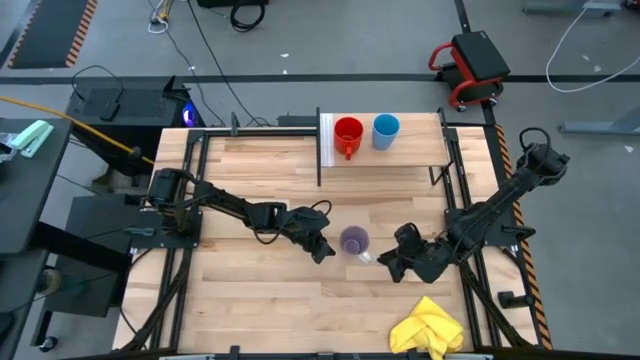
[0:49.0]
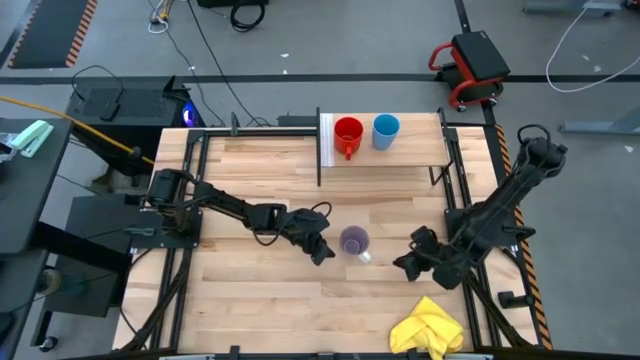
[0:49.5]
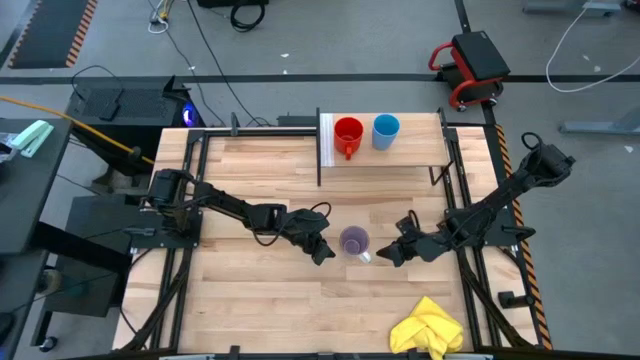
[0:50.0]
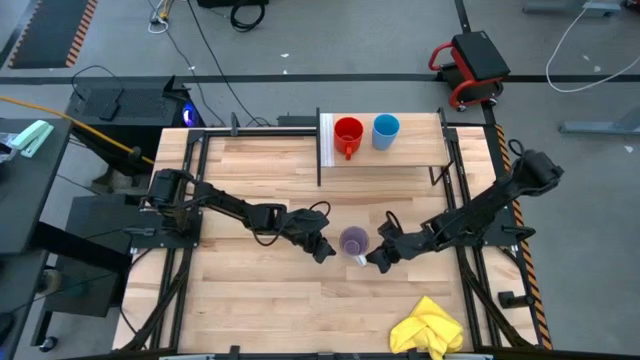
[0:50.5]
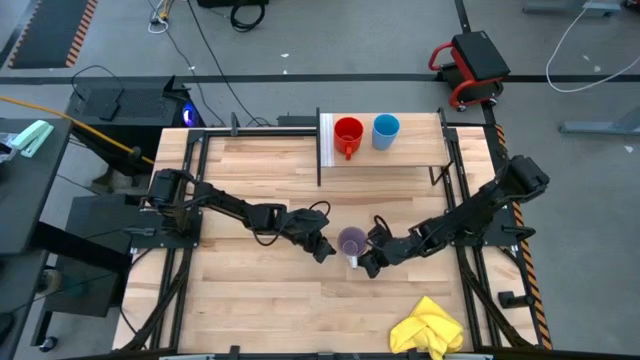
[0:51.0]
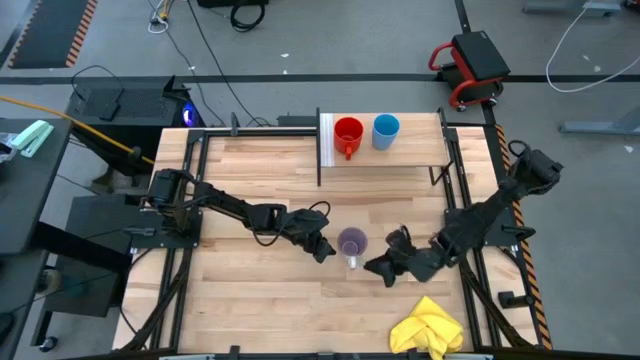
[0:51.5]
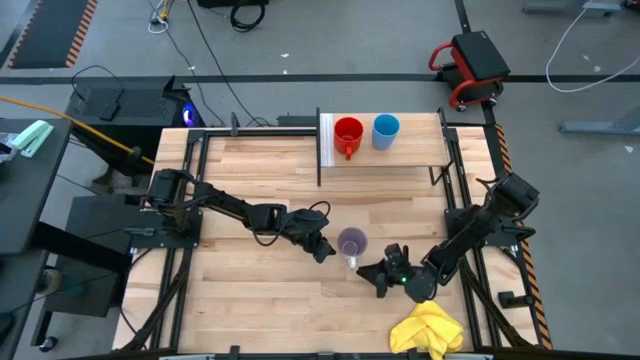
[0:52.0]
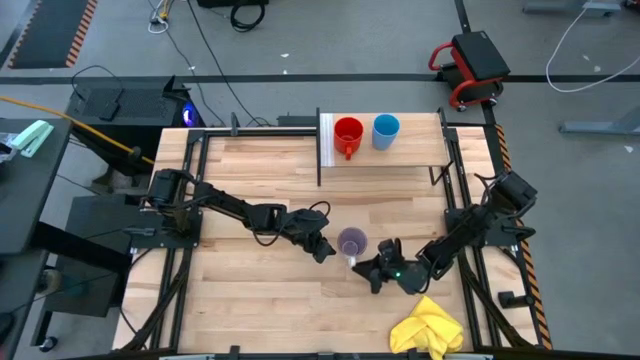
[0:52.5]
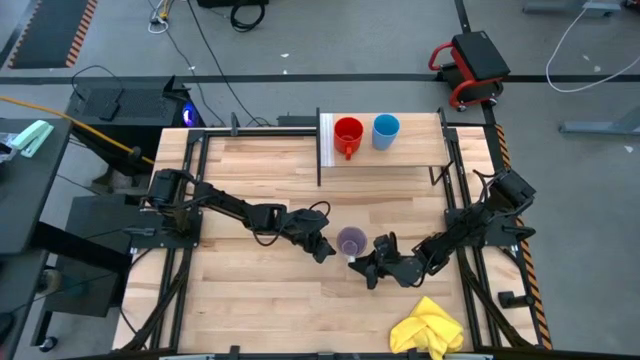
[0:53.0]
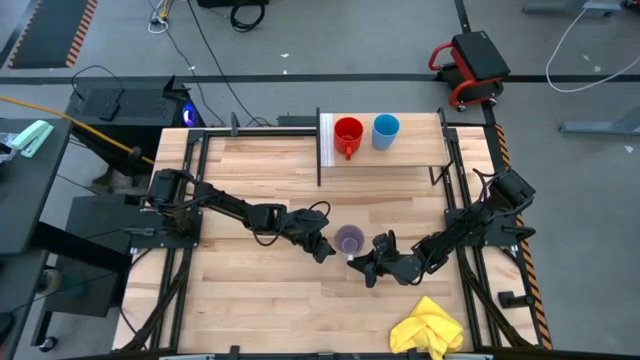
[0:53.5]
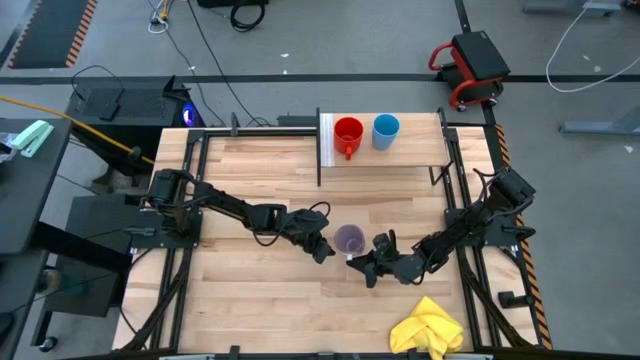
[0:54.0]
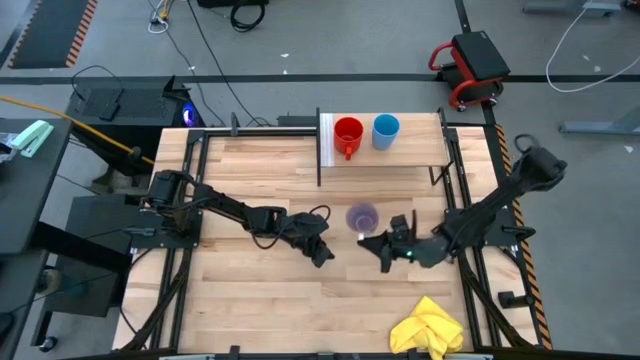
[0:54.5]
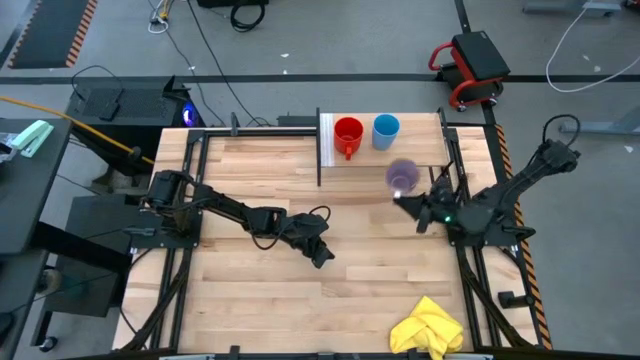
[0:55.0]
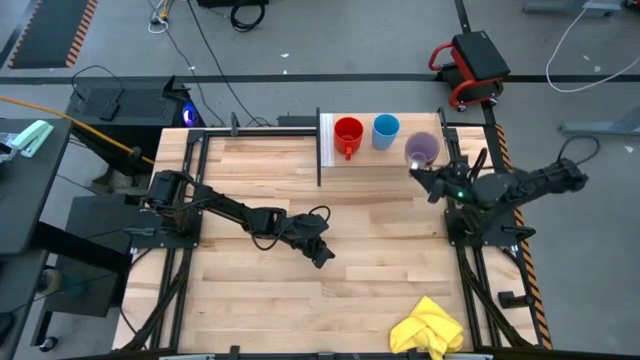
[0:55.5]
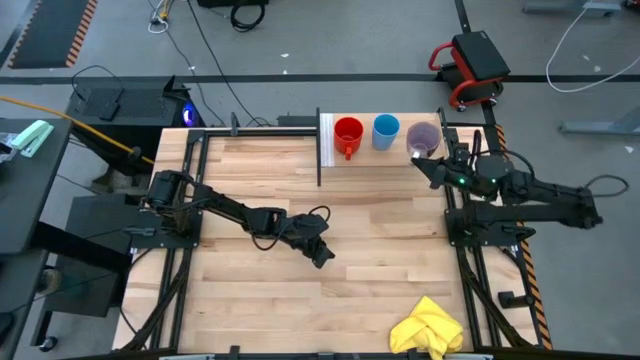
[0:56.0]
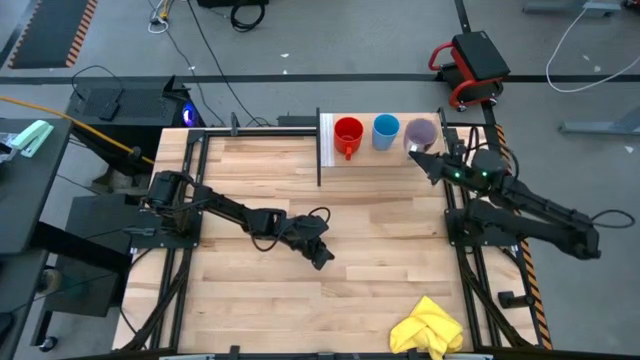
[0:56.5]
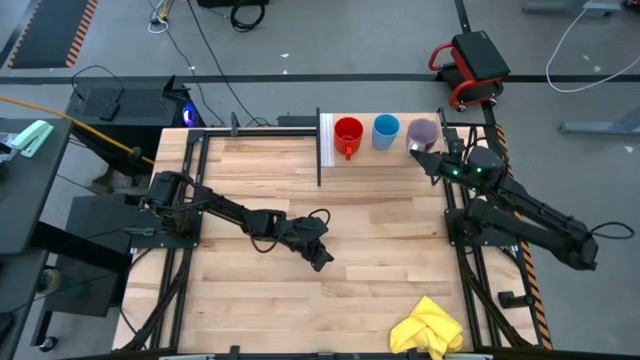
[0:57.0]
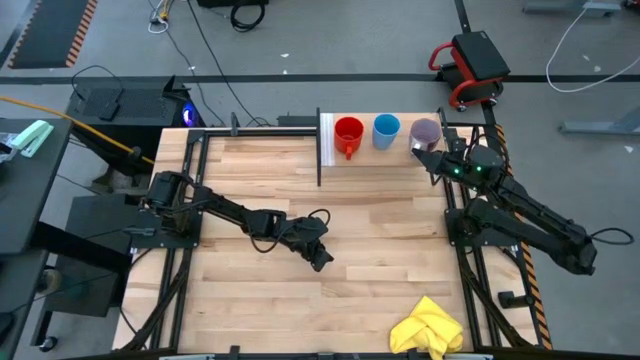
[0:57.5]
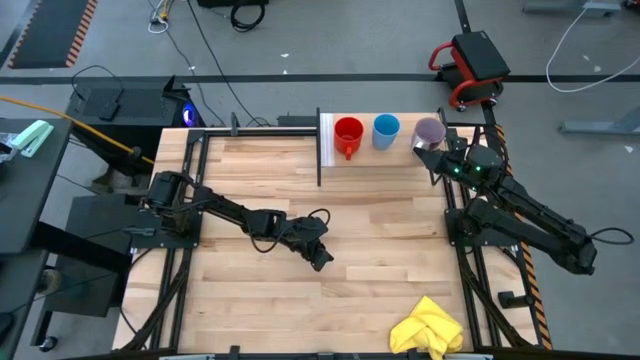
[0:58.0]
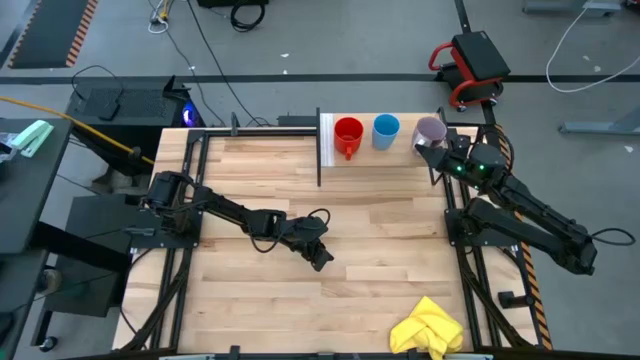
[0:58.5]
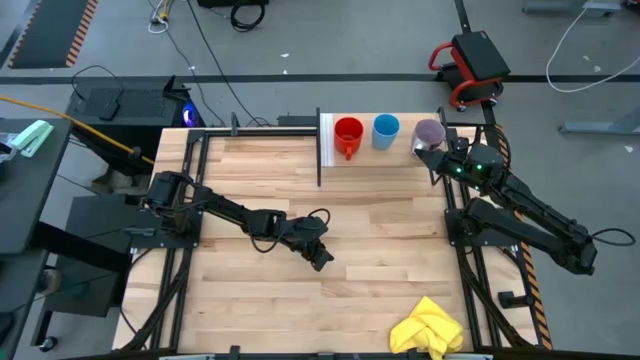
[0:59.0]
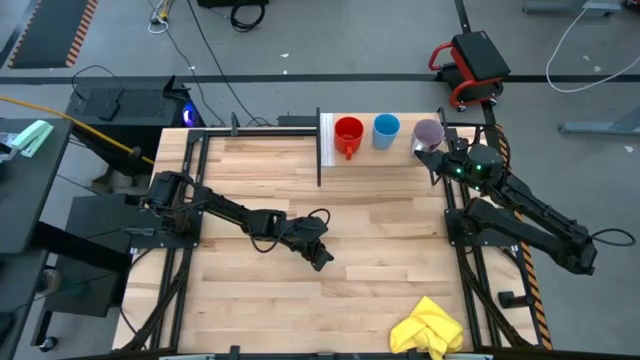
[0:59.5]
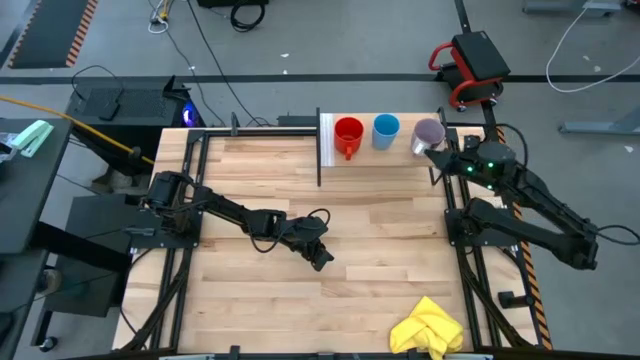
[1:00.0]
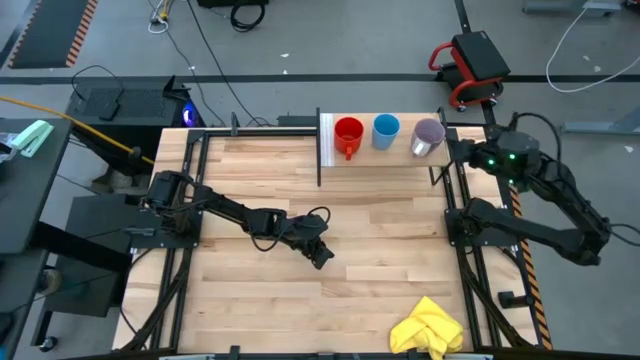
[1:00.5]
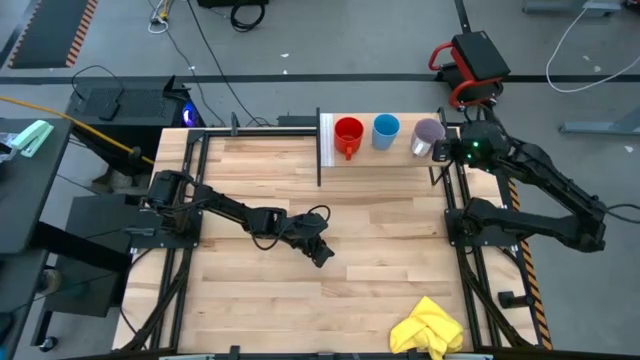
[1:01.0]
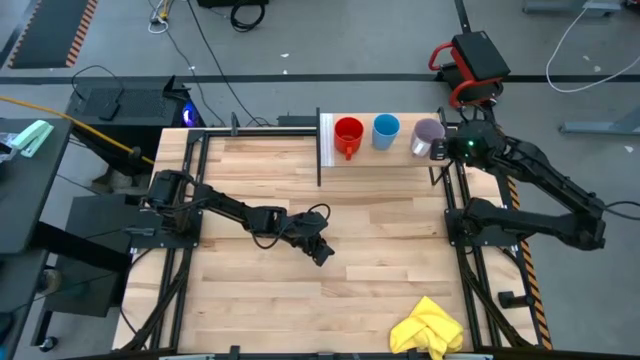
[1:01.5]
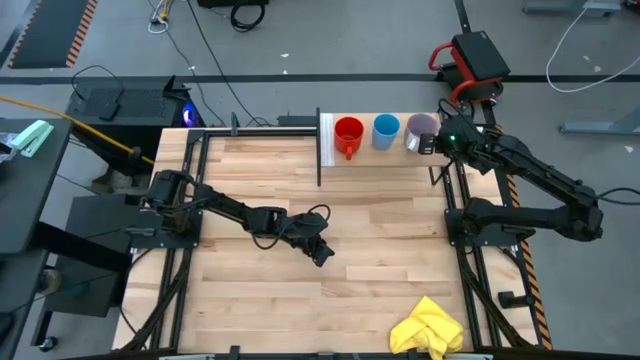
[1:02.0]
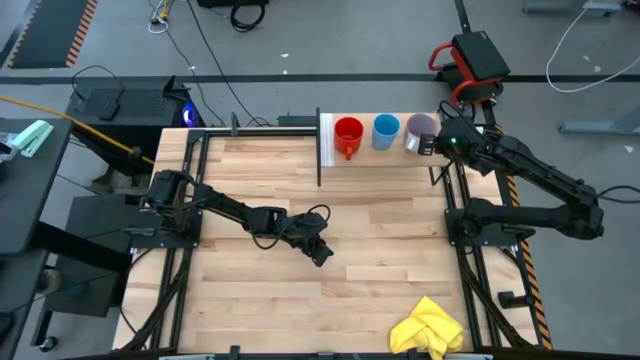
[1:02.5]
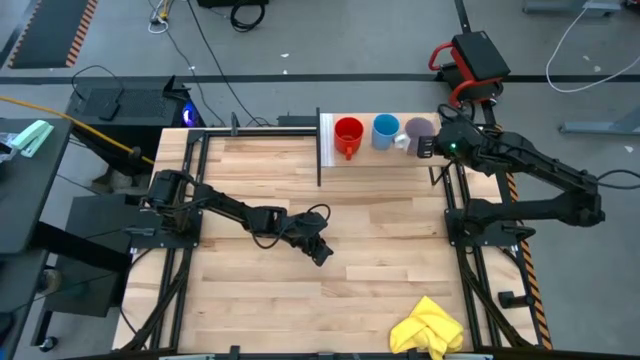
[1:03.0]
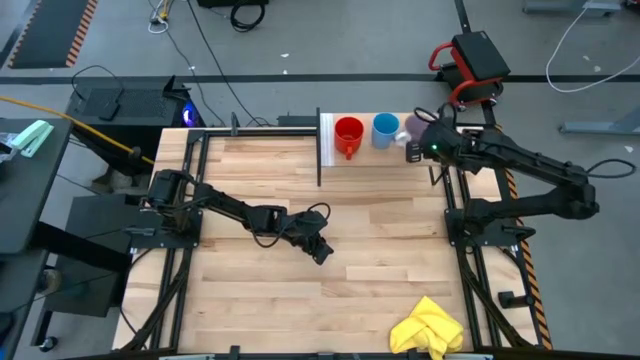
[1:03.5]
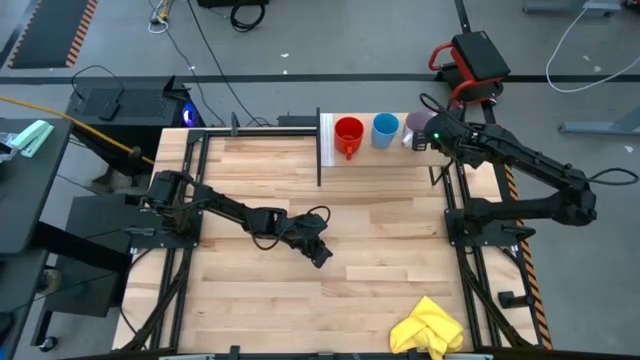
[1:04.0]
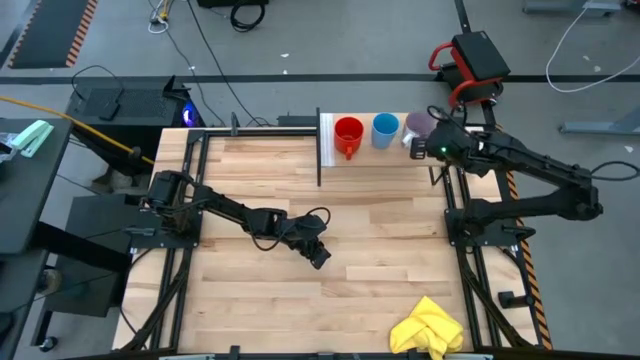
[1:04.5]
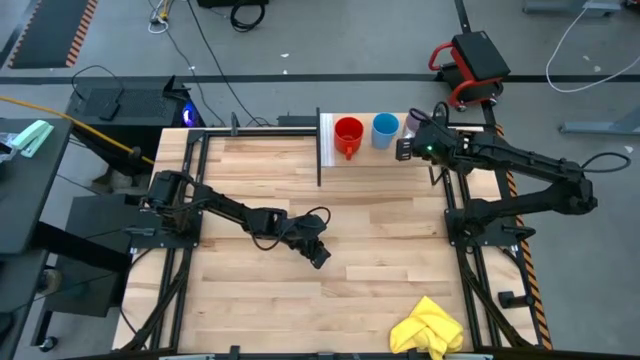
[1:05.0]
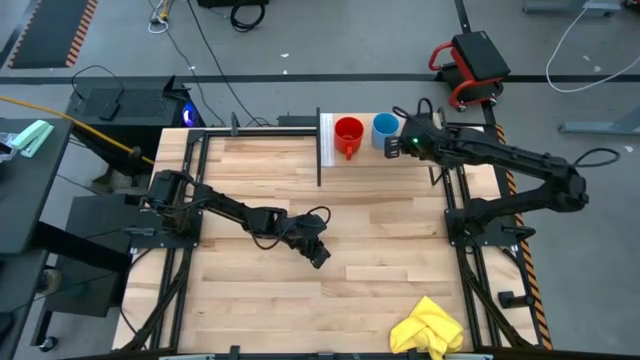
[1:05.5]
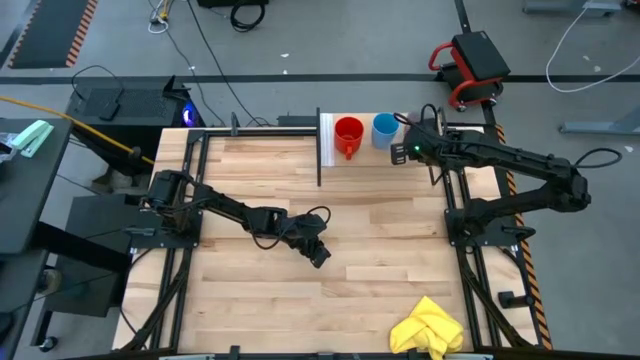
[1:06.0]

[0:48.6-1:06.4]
Task: Stack small to large cups/mugs on shelf
Put the purple mug on the shelf

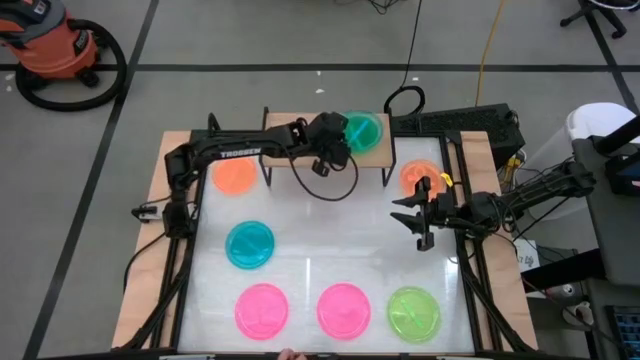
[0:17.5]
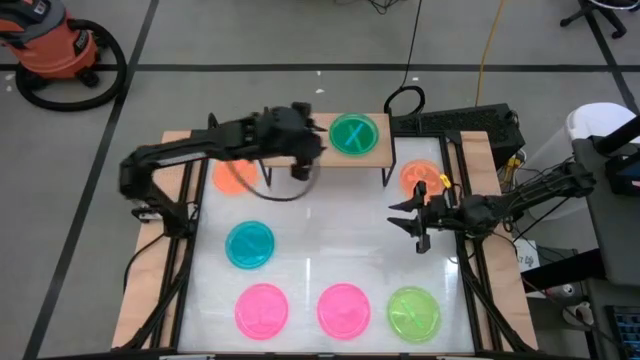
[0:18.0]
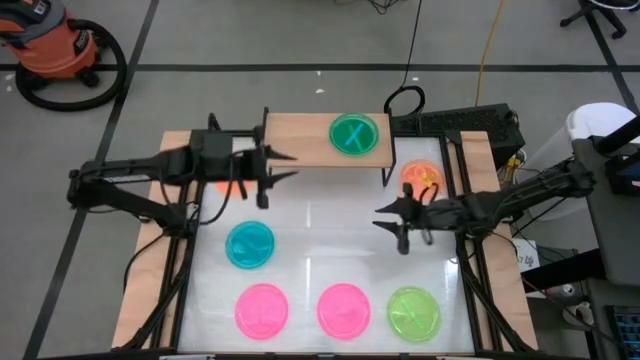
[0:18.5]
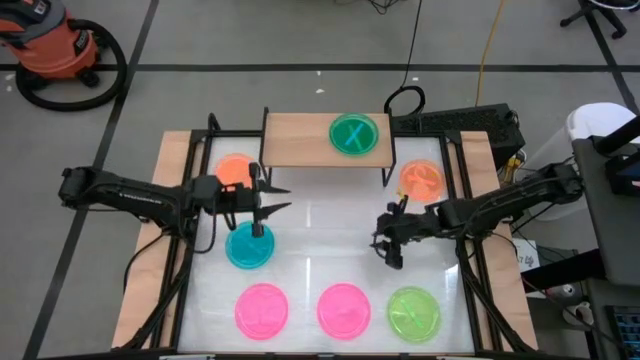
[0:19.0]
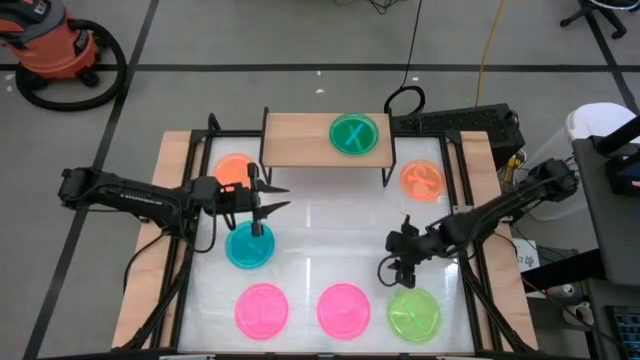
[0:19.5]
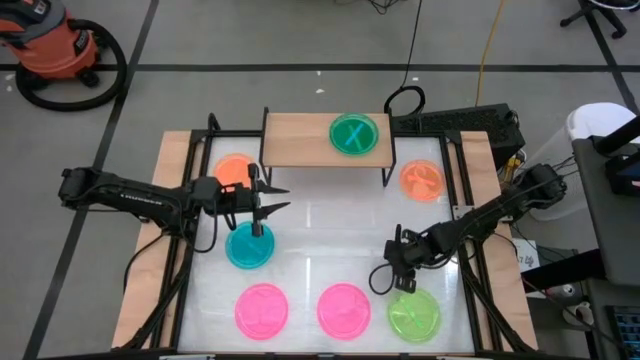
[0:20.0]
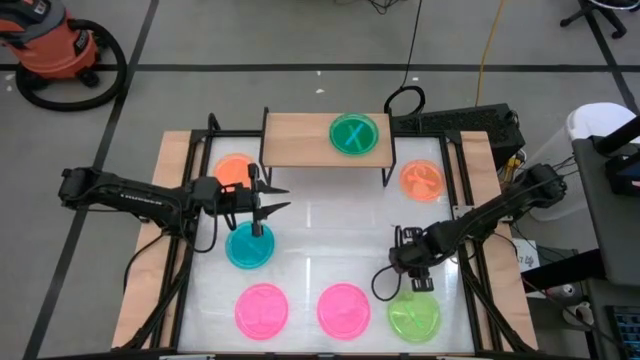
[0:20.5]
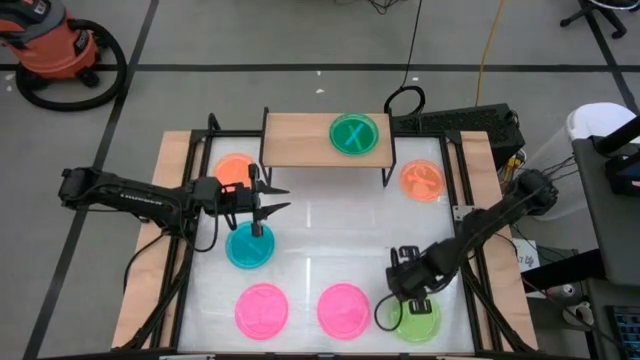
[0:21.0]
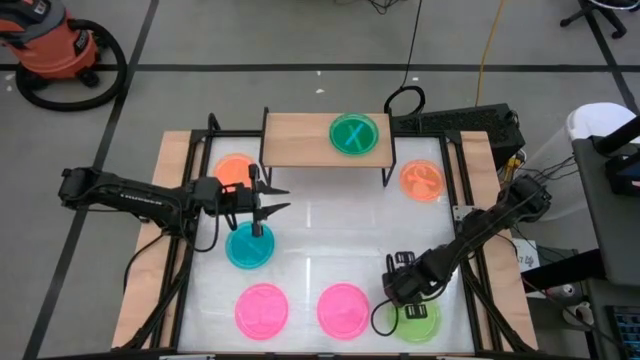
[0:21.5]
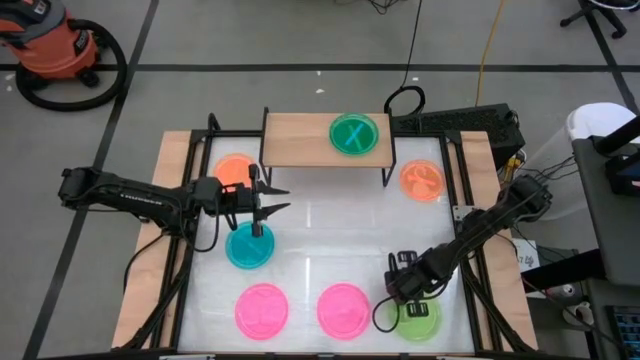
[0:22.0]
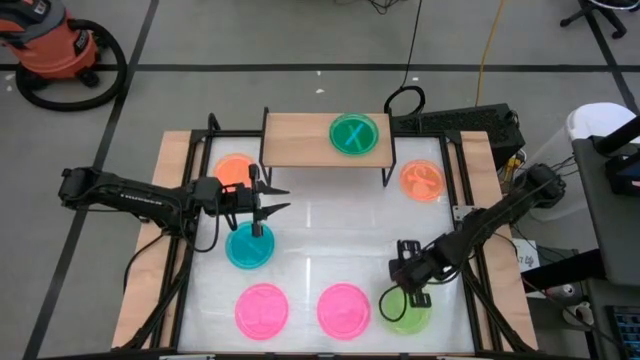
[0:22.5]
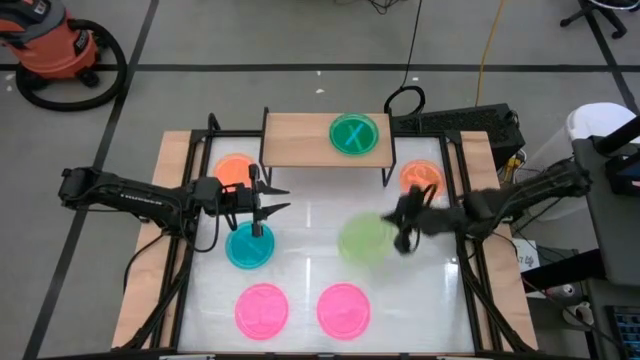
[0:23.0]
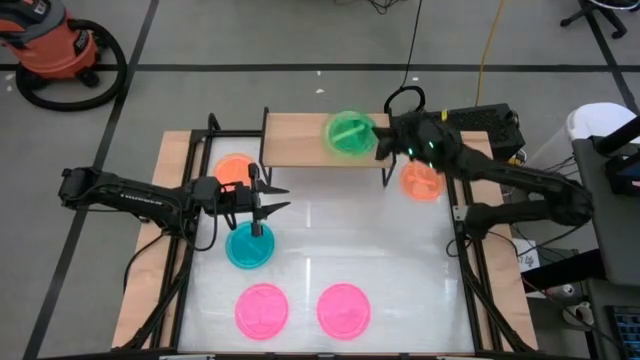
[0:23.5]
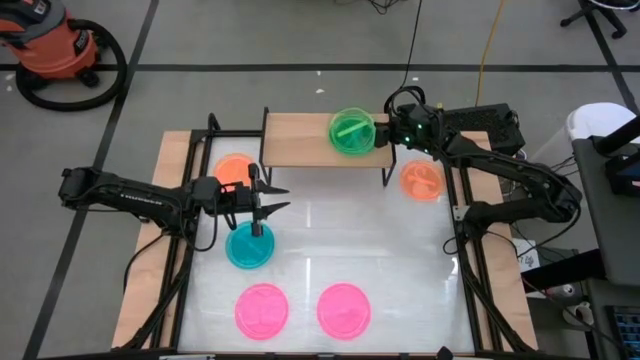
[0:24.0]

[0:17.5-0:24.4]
Task: Place and stack plates onto a shelf
Stack the green transparent plate on the blue transparent plate on the shelf
